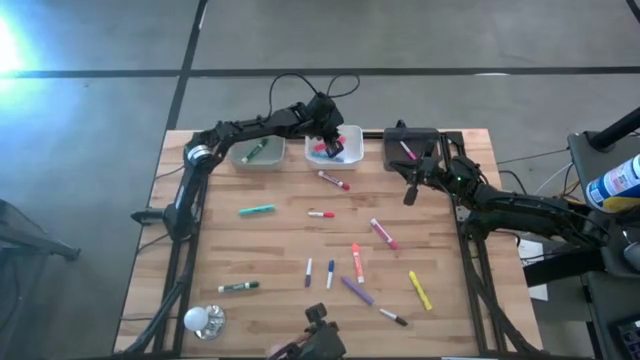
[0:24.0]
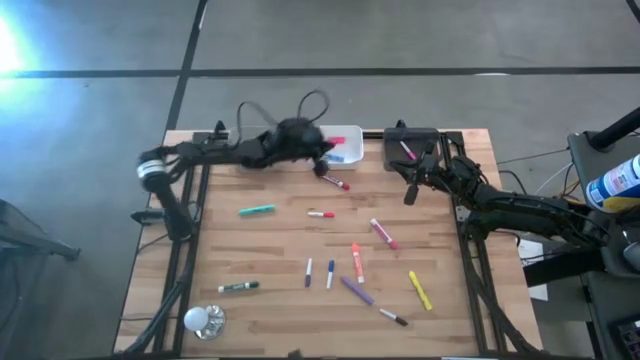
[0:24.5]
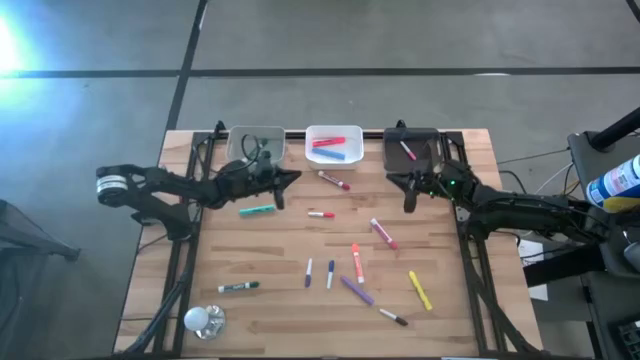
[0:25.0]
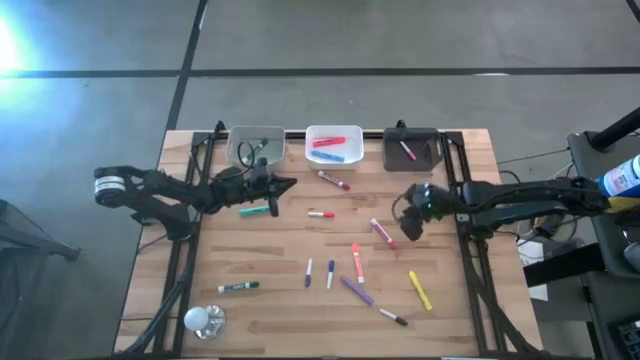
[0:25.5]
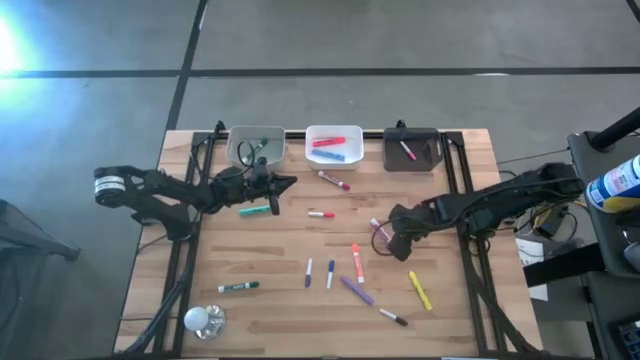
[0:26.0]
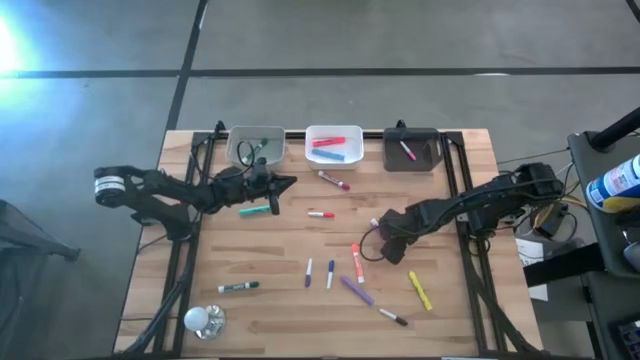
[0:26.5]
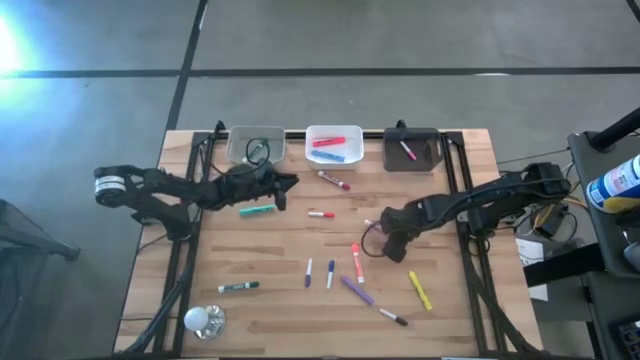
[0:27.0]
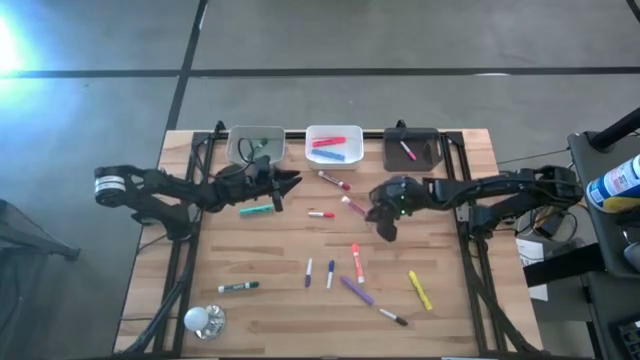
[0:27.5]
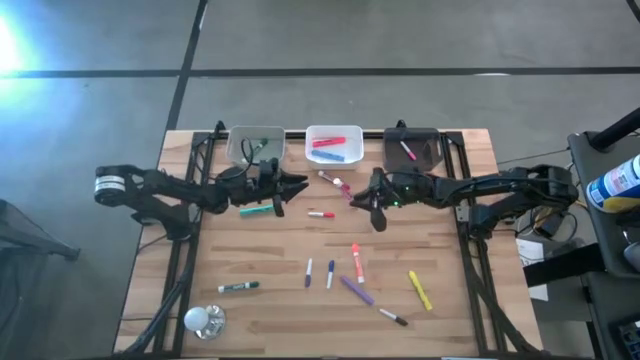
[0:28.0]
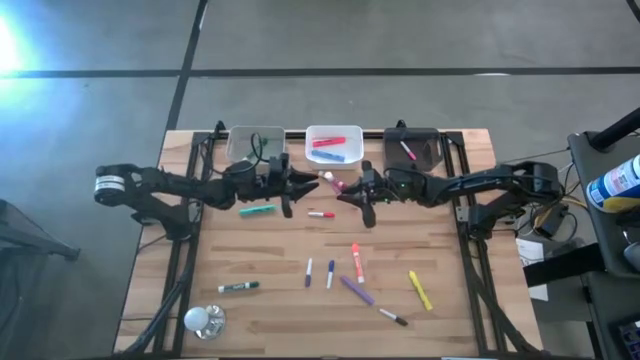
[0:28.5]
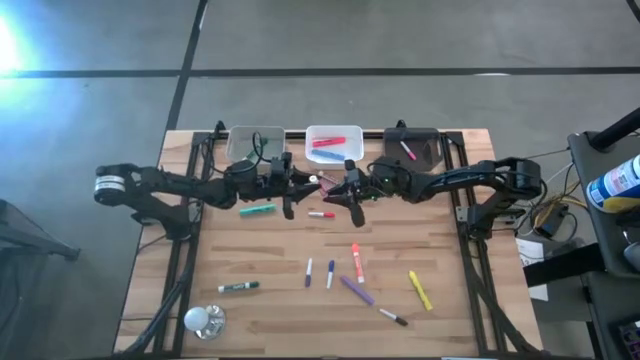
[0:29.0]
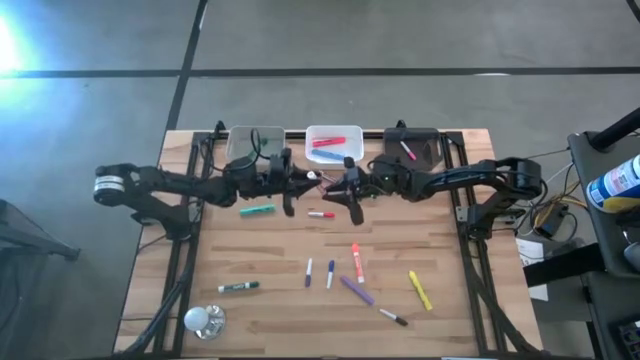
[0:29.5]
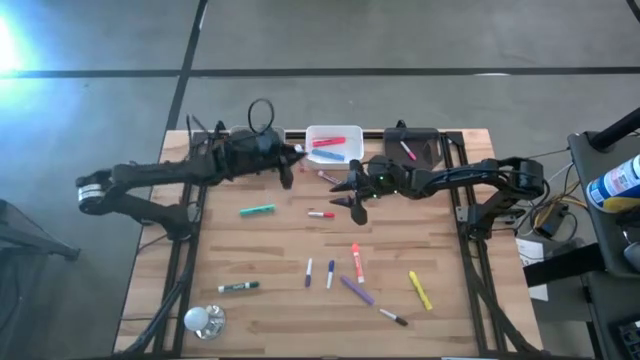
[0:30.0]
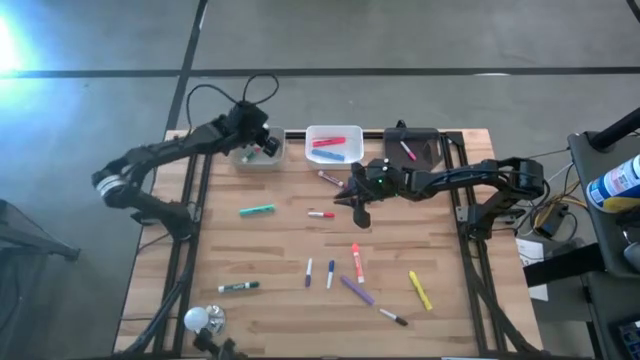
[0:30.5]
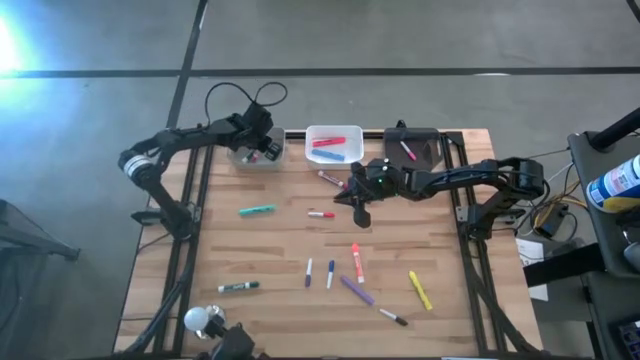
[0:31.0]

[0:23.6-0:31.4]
Task: Pick & Place Markers
Put the pink marker pen into the gray bin

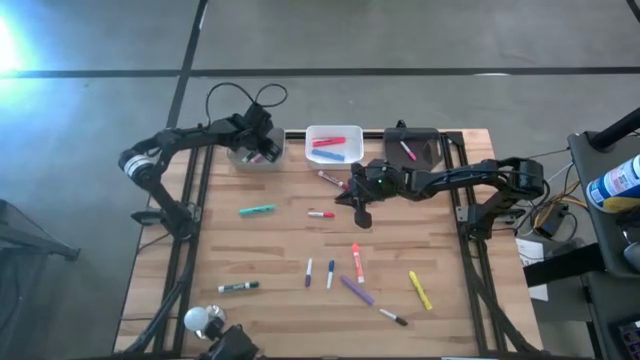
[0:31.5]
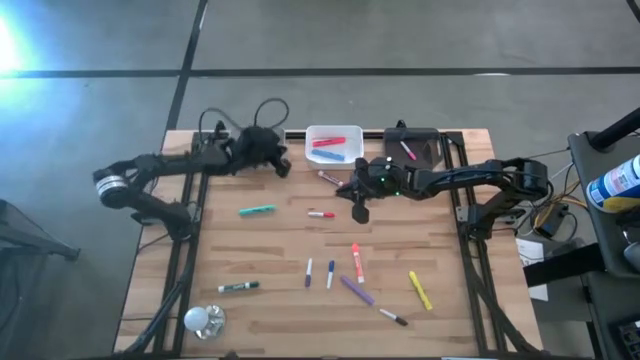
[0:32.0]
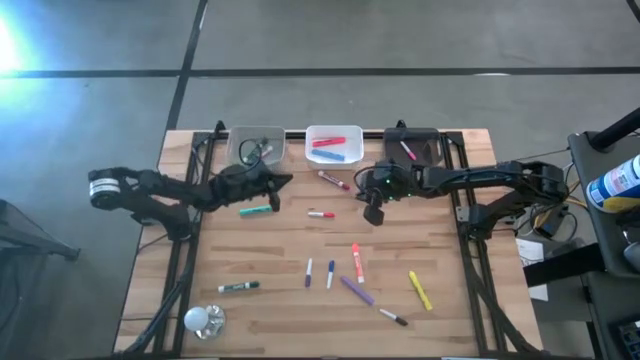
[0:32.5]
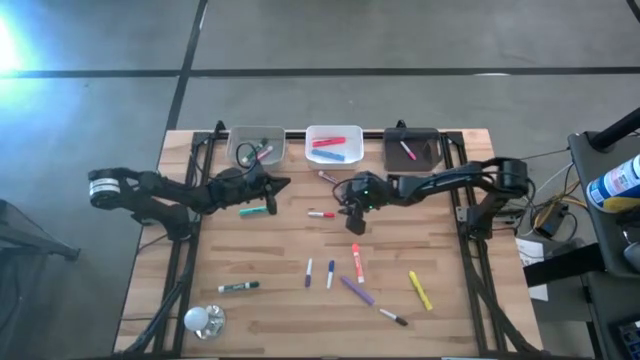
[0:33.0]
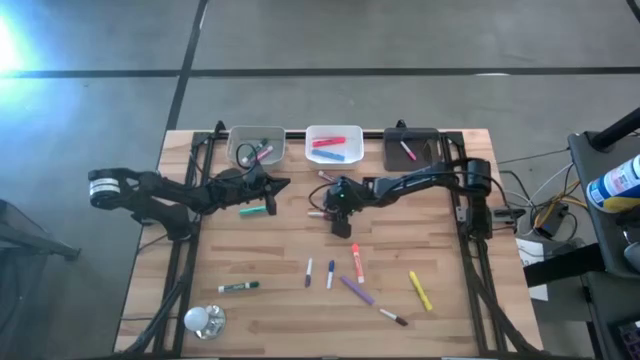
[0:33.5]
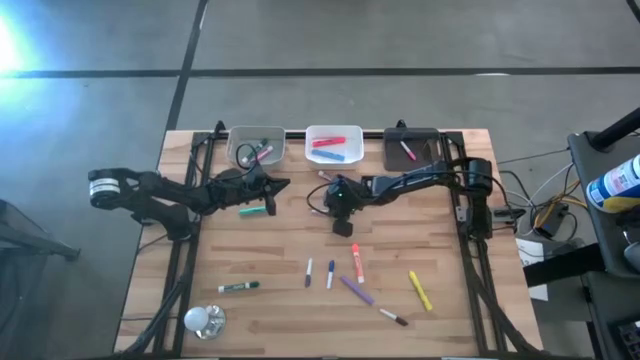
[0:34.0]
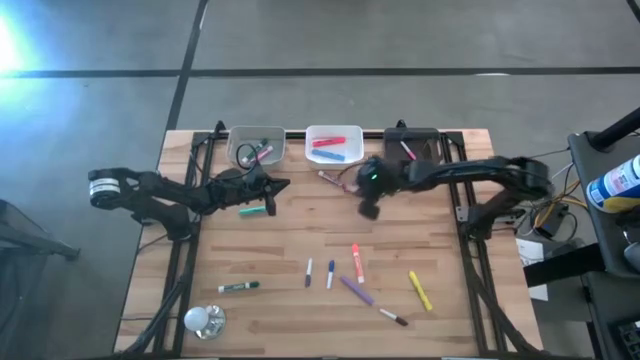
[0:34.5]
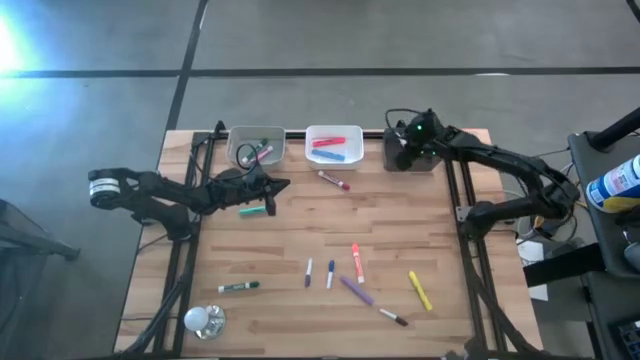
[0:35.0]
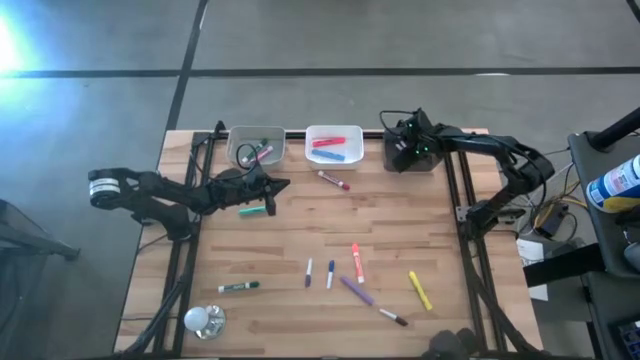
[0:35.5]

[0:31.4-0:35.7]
Put the pink pen into the black bin

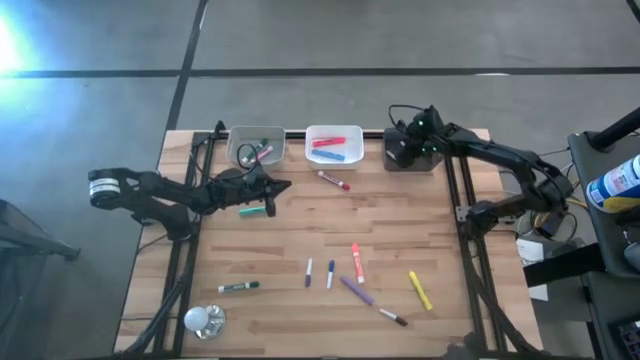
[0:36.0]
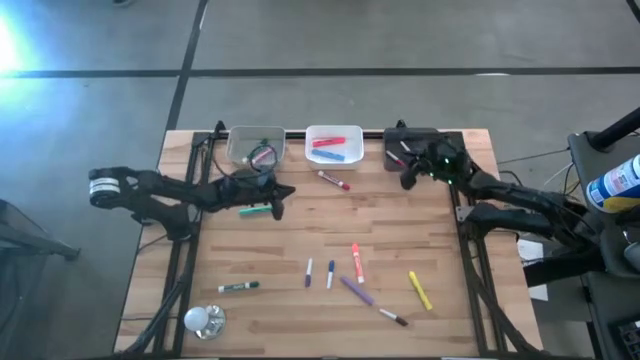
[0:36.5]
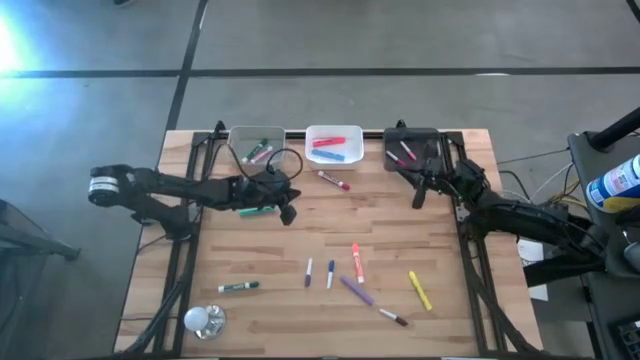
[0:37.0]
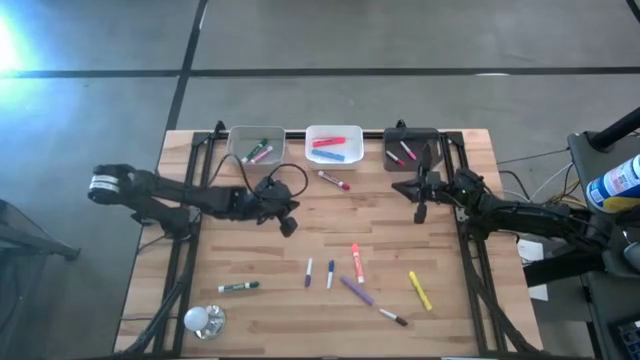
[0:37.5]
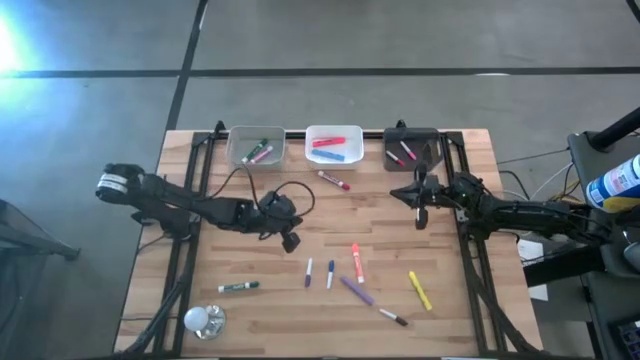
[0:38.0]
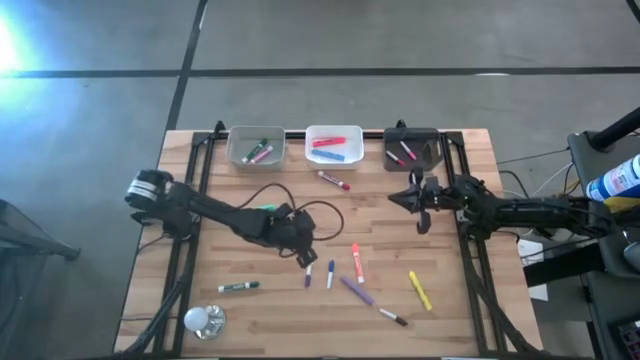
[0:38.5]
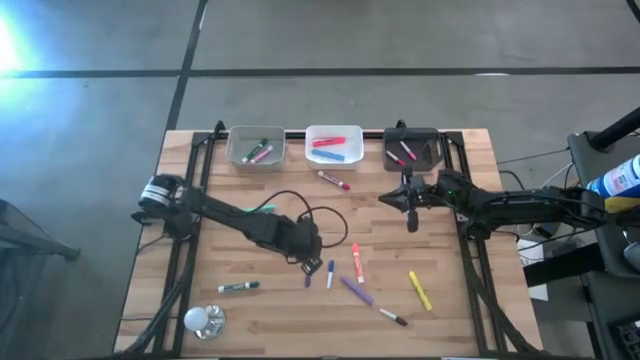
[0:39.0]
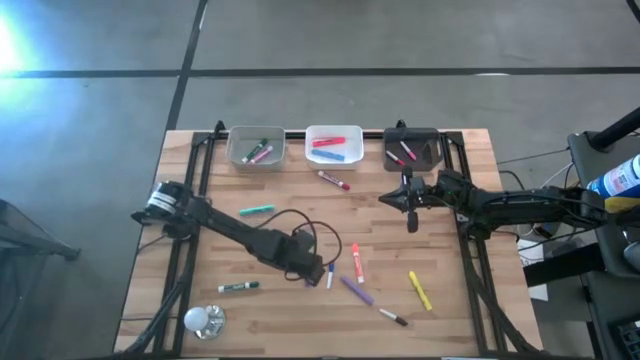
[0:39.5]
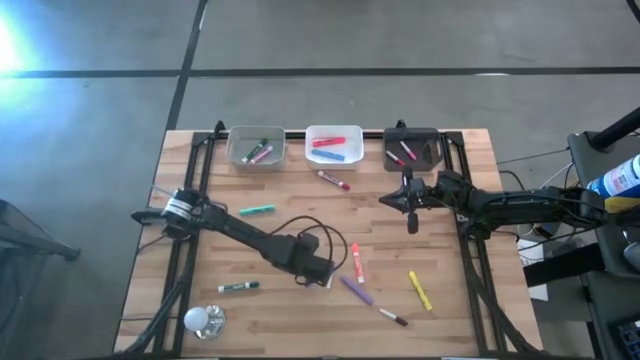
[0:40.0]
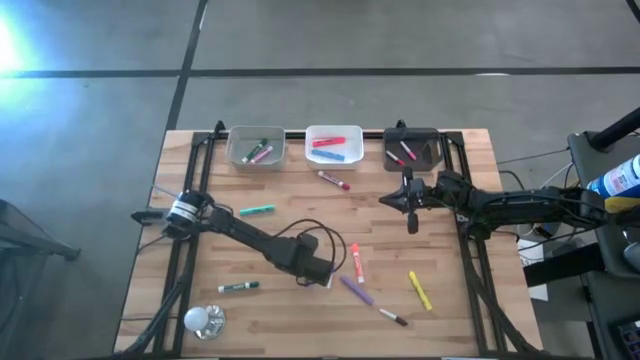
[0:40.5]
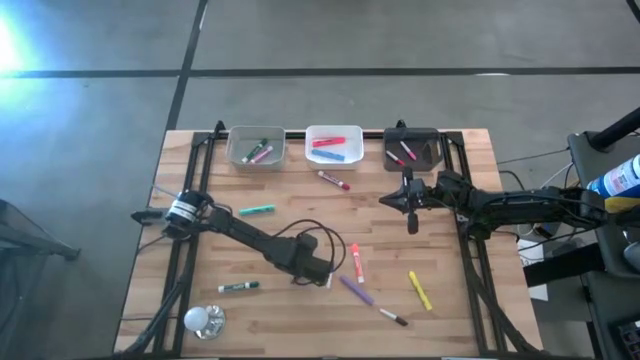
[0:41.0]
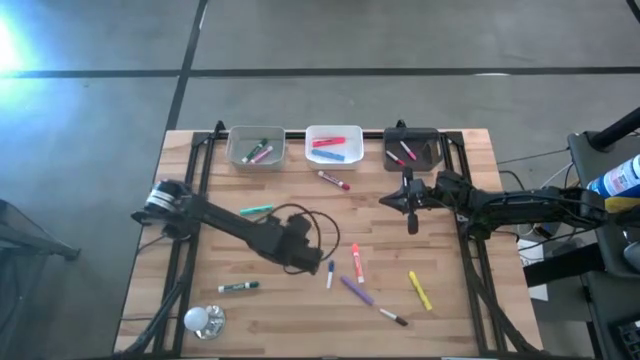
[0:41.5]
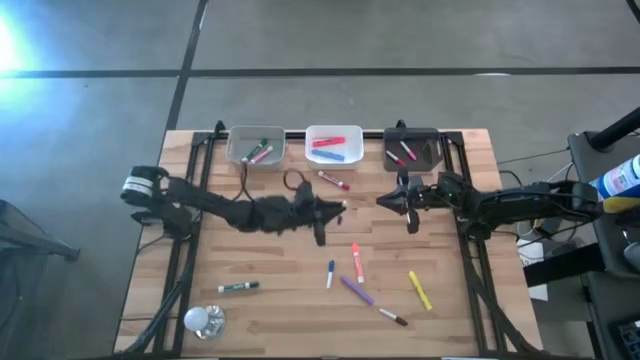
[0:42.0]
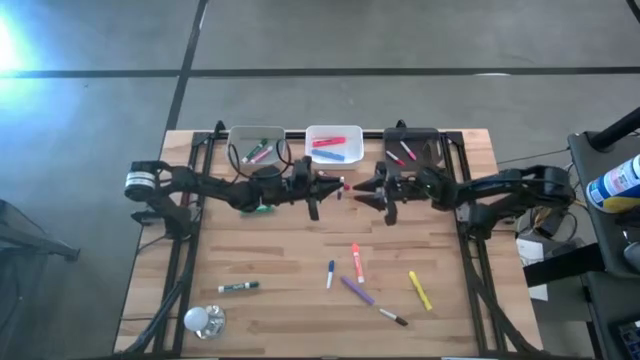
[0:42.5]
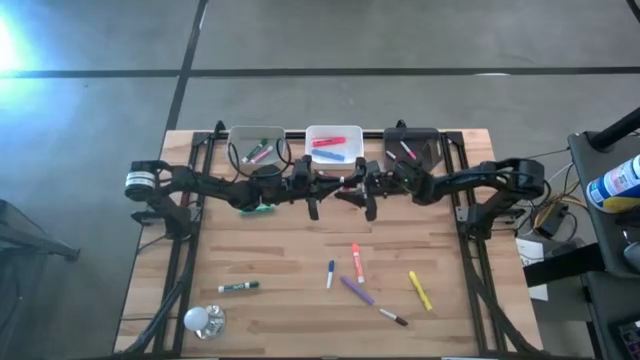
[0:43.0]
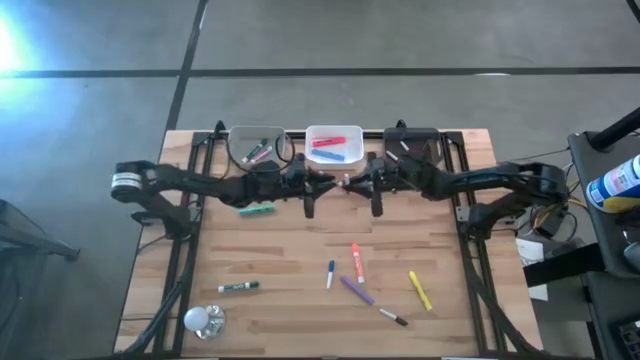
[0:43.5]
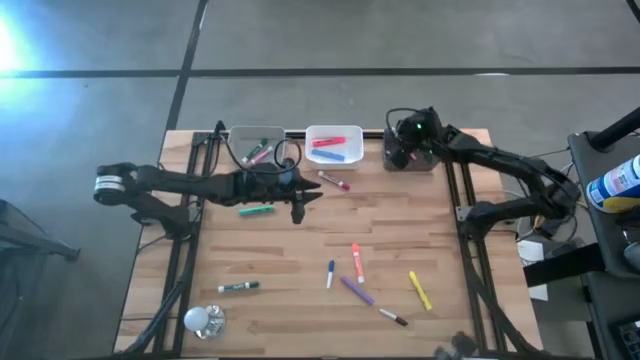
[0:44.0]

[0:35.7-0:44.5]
Put the blue pen into the black bin
